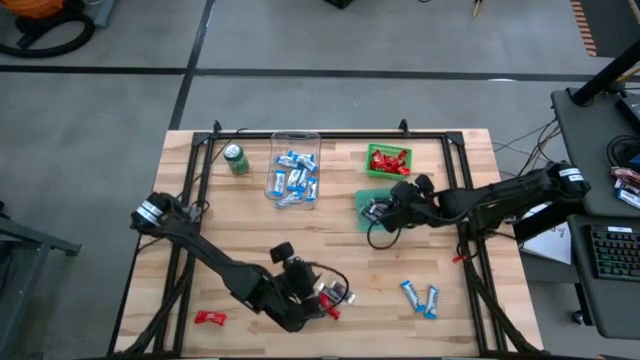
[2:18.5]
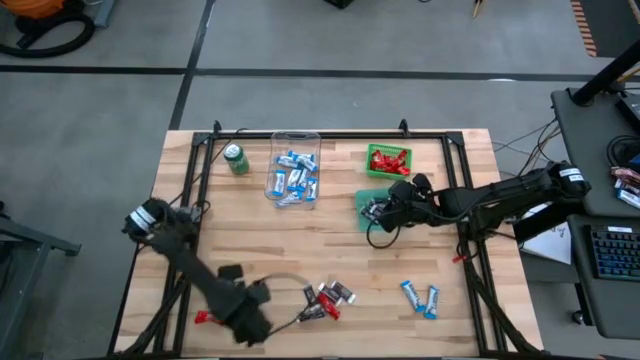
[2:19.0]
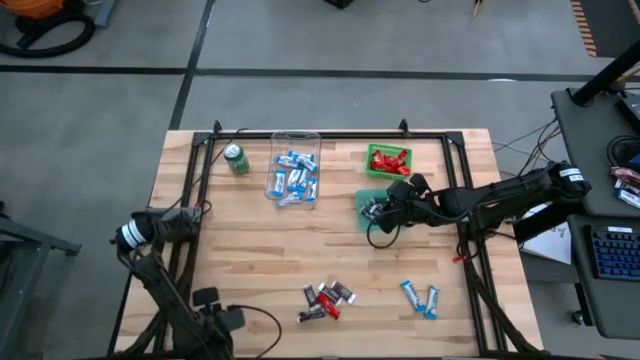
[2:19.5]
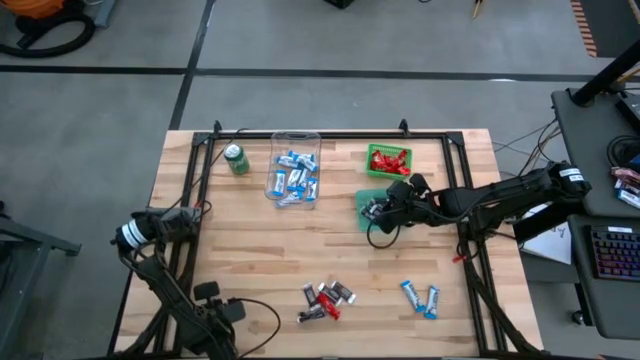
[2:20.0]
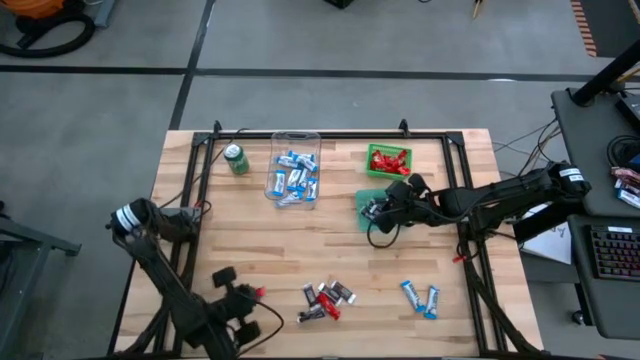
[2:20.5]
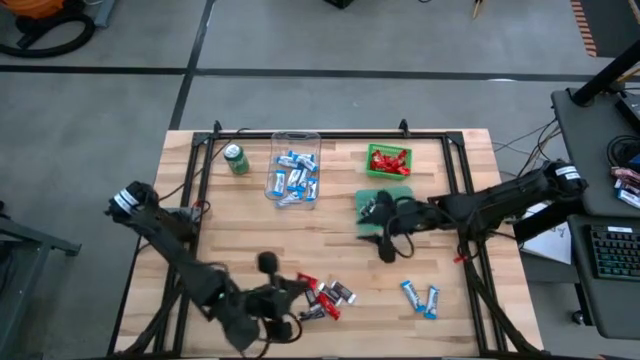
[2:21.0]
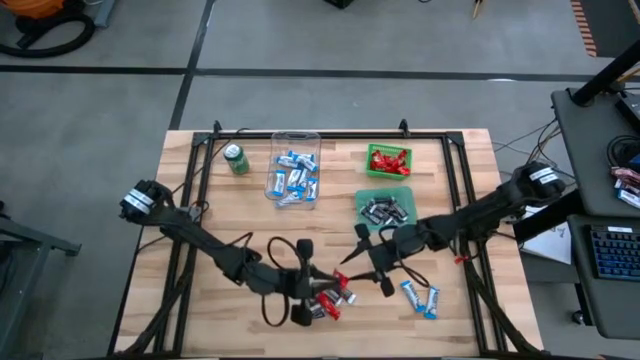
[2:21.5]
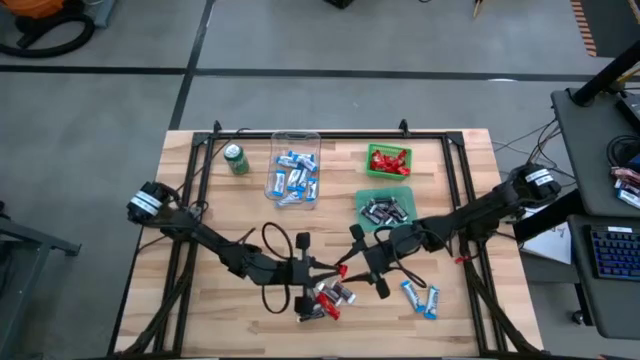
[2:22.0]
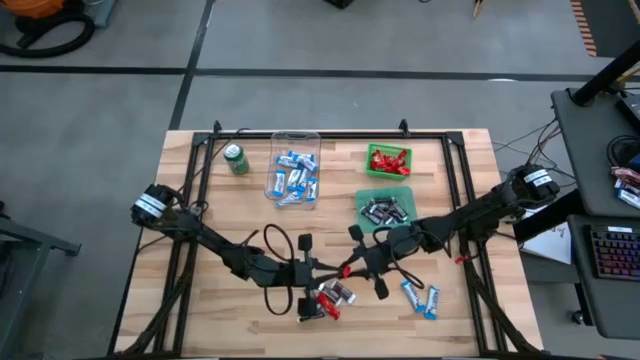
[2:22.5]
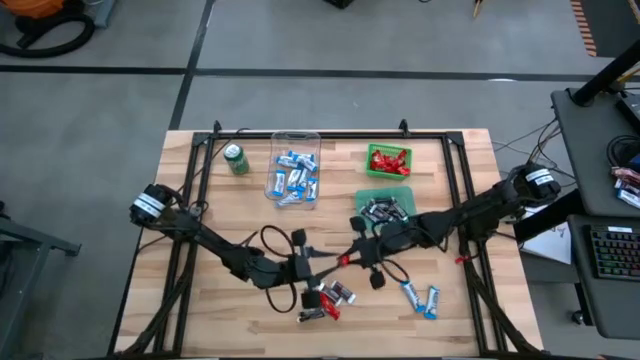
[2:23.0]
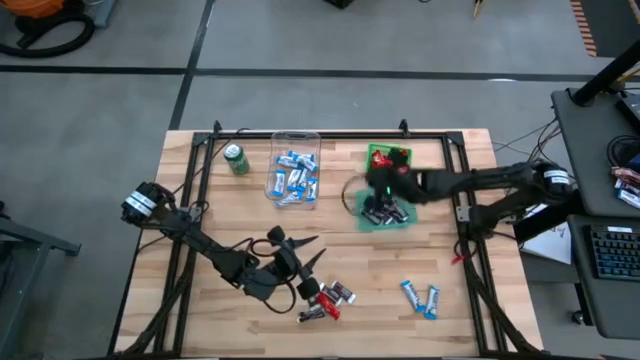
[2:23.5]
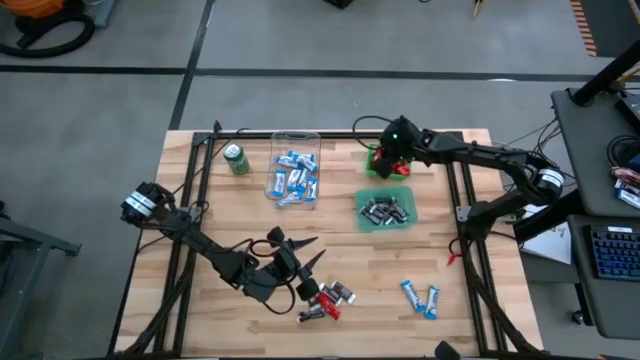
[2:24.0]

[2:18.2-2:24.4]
Task: Sort candy
Put the red candy into the green bin

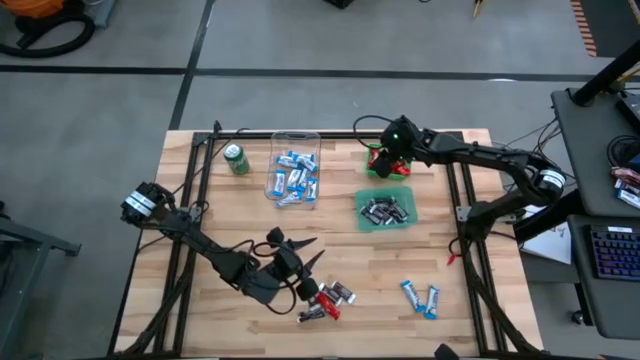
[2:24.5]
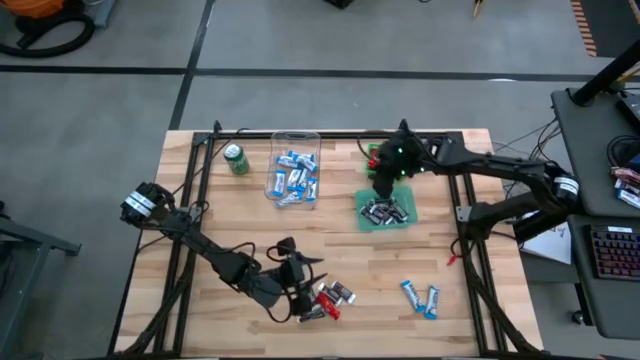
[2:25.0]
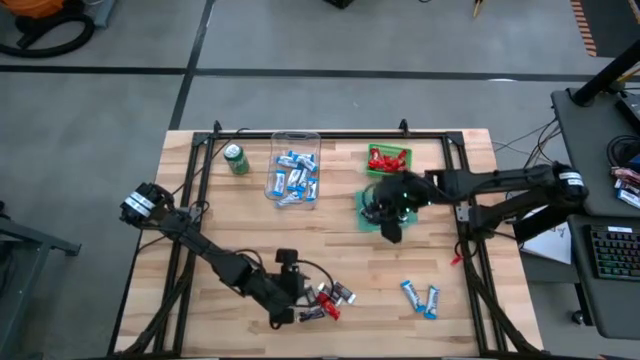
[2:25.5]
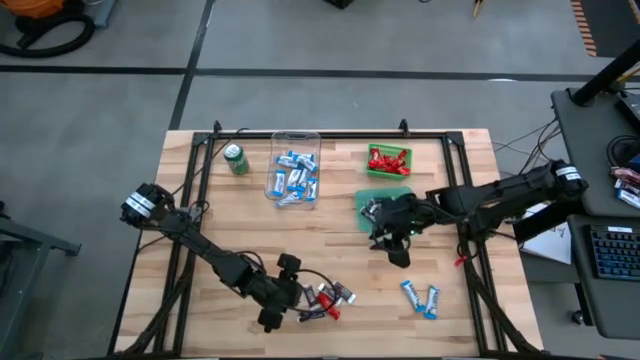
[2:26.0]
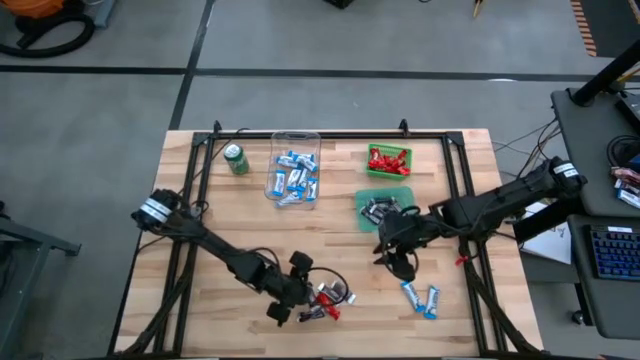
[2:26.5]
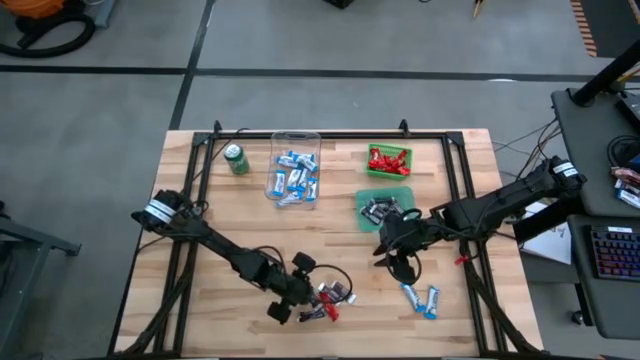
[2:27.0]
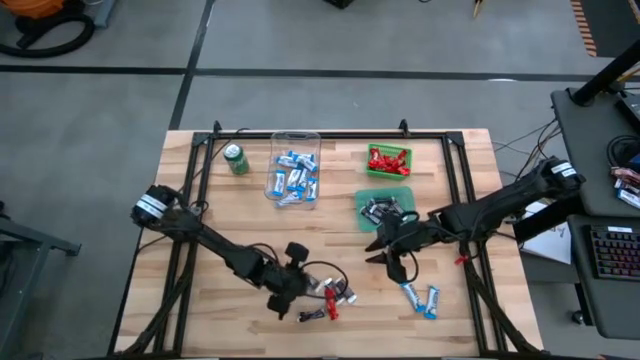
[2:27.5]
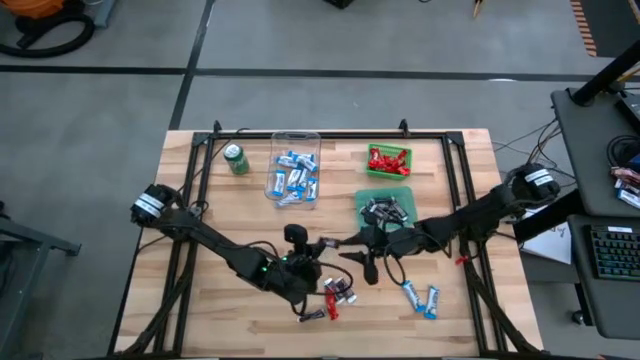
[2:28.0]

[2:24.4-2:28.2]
Put the brown candy into the blue bin

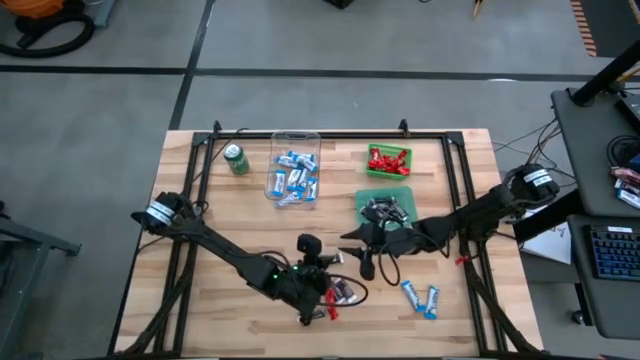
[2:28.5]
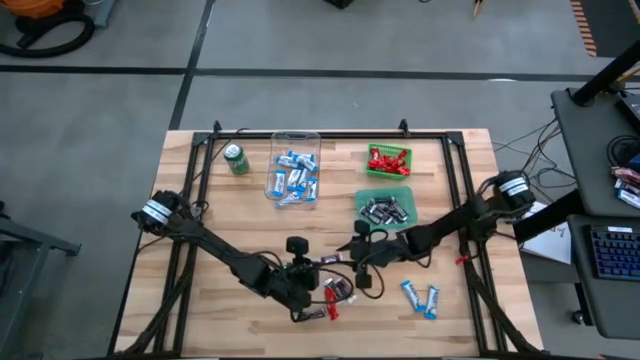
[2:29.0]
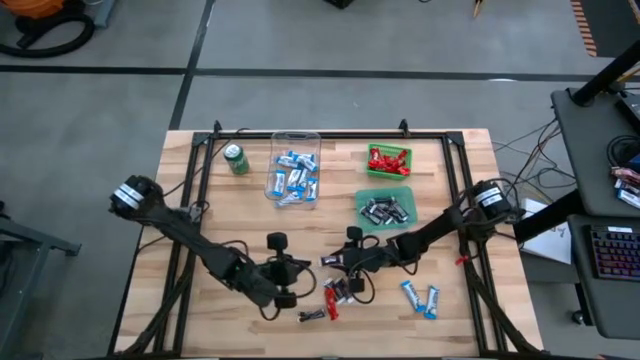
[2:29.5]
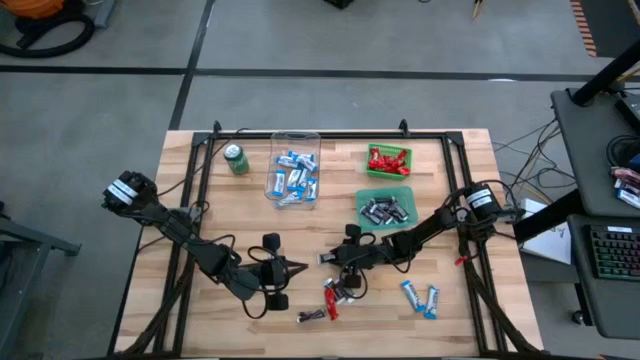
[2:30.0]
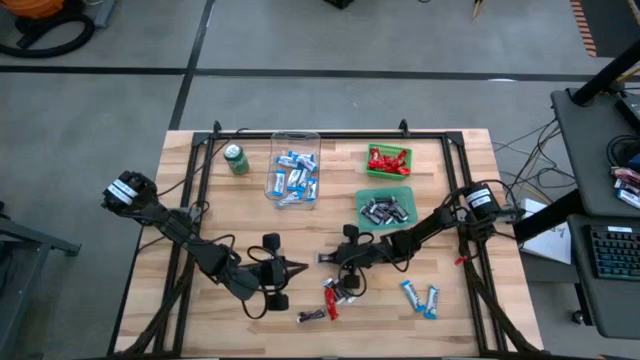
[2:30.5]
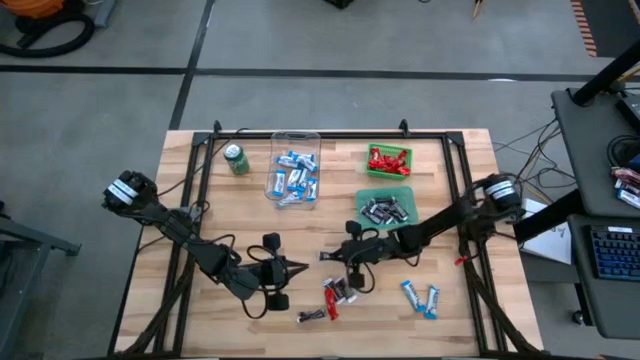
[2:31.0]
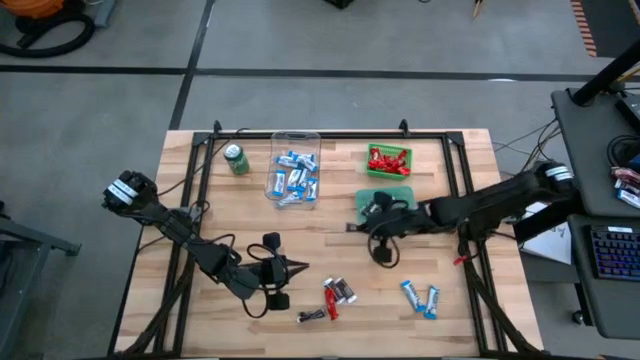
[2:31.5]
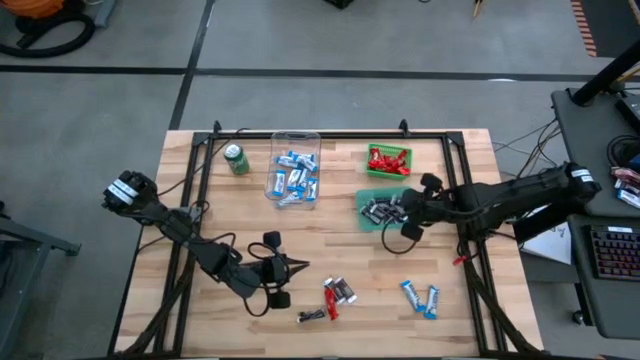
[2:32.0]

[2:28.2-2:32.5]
Put the brown candy into the blue bin

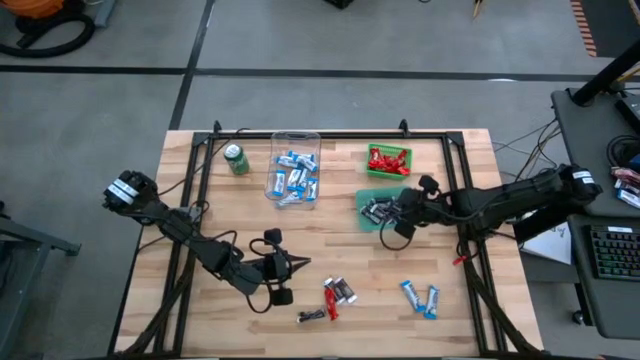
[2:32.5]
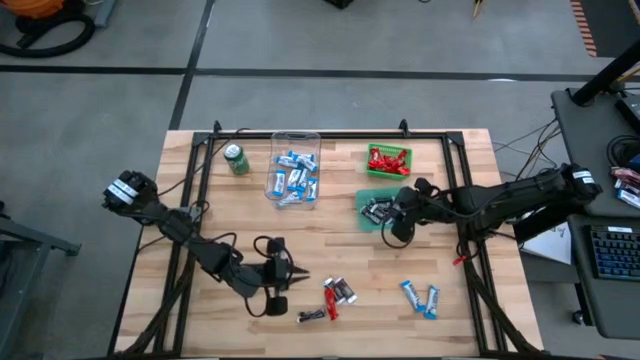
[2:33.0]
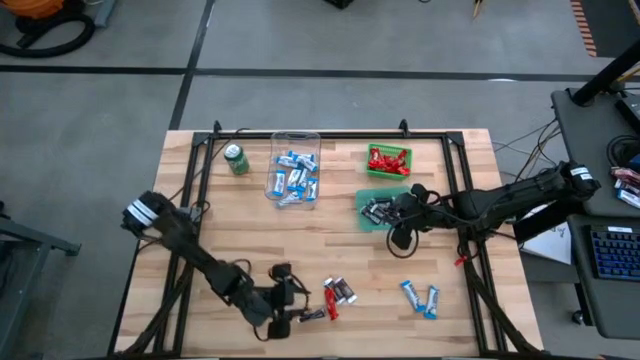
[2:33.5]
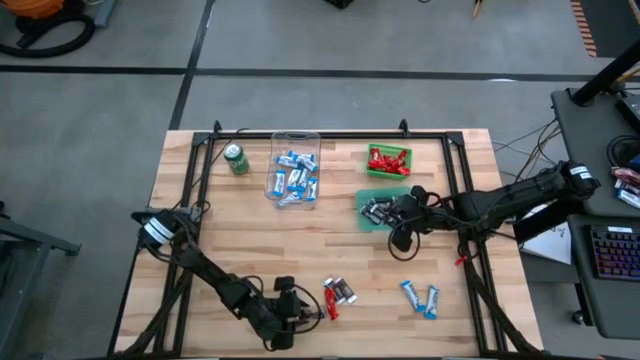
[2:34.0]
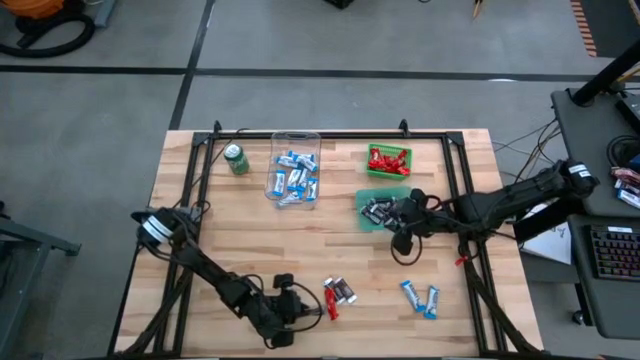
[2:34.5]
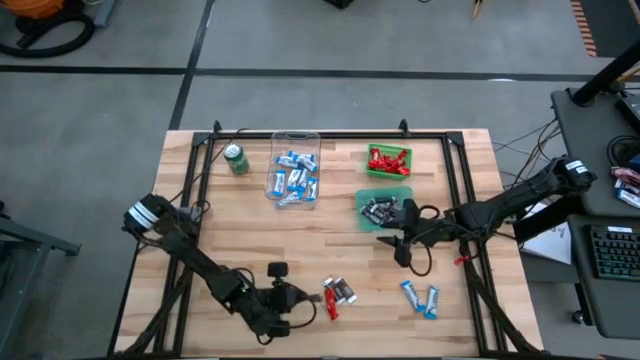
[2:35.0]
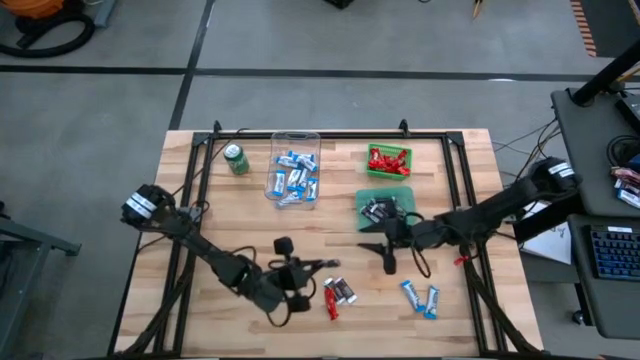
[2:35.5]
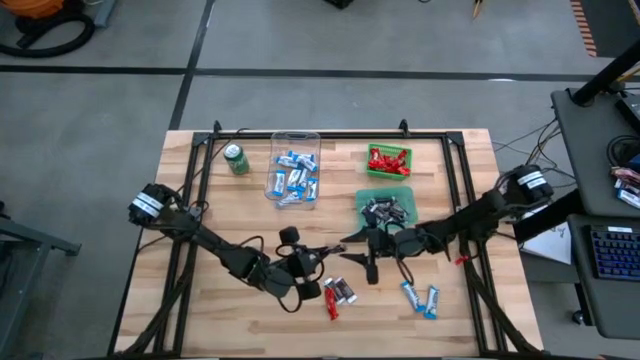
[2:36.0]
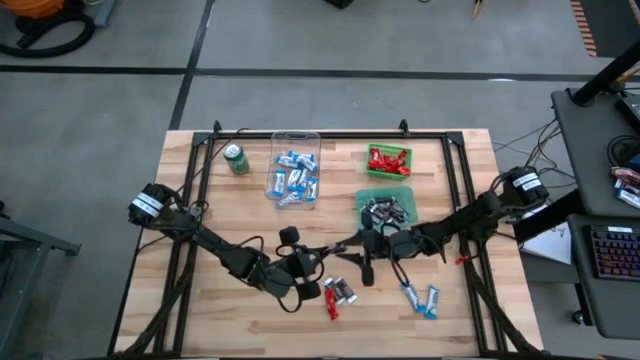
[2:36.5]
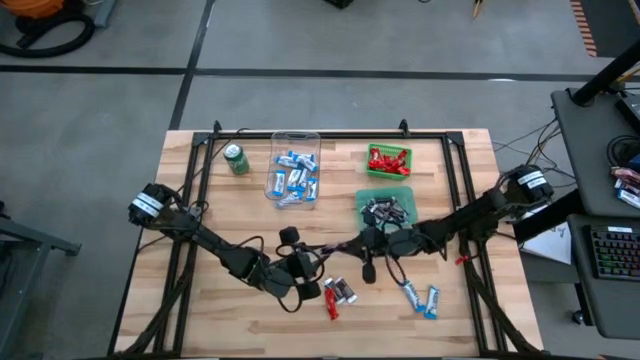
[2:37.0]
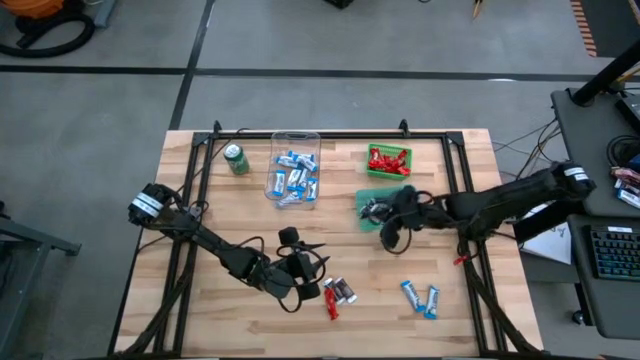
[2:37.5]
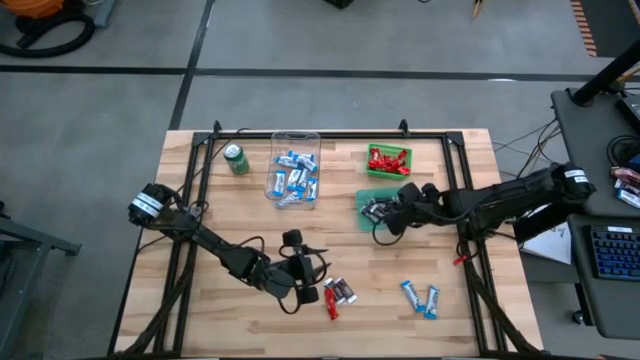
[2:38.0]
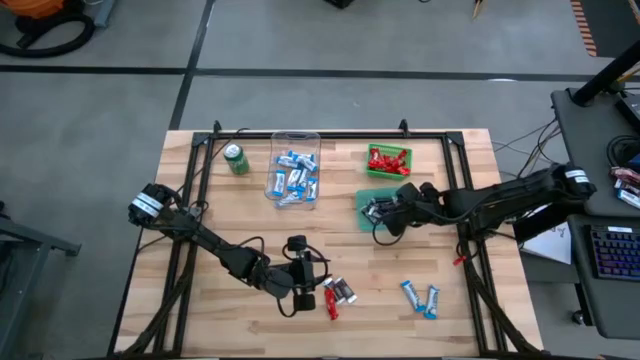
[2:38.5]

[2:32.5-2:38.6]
Put the brown candy into the blue bin

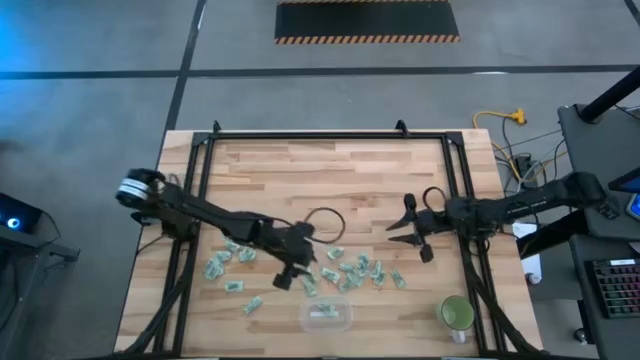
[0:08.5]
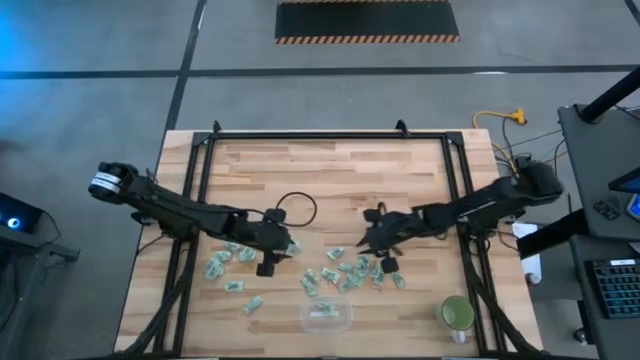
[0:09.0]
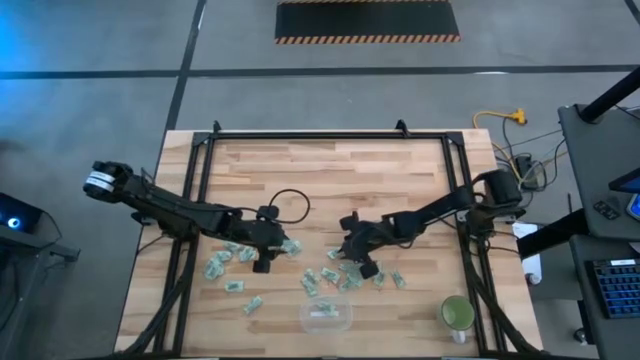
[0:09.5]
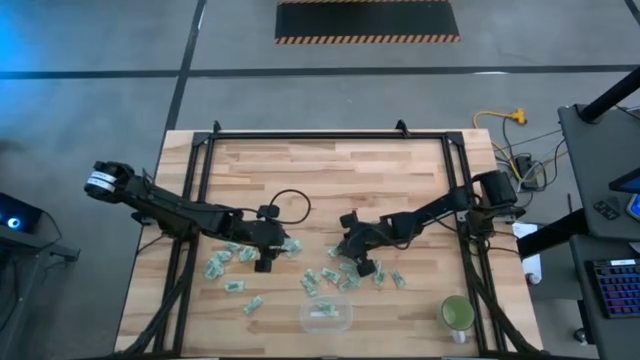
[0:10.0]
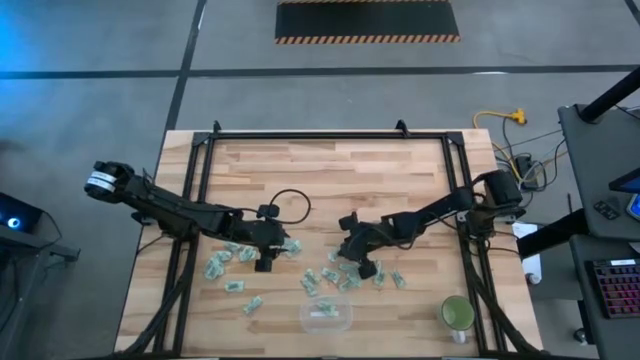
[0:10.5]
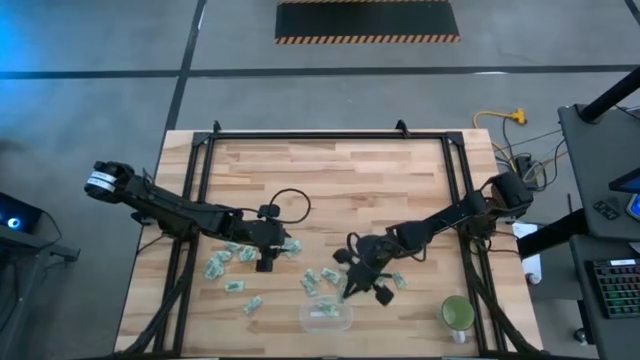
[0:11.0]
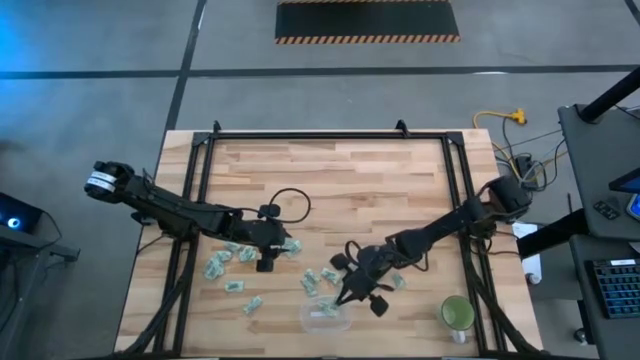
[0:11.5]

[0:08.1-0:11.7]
Task: Pick and place Stevia / Truvia into bins
Put the stevia packet into the transparent container
